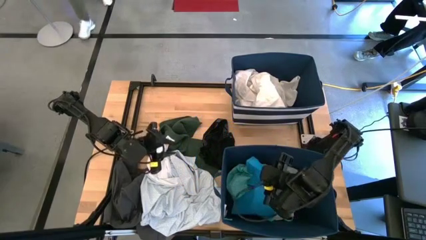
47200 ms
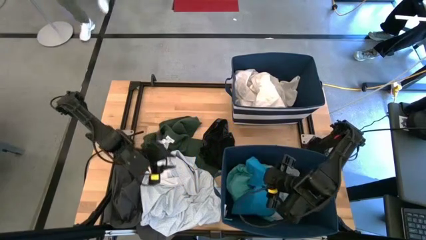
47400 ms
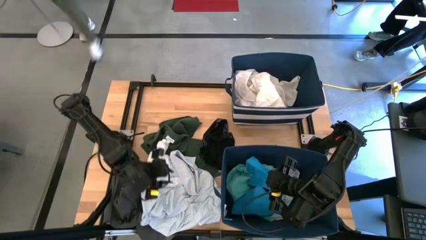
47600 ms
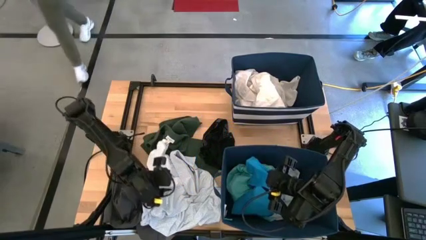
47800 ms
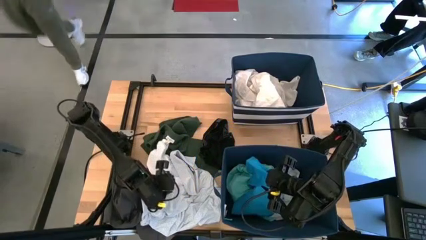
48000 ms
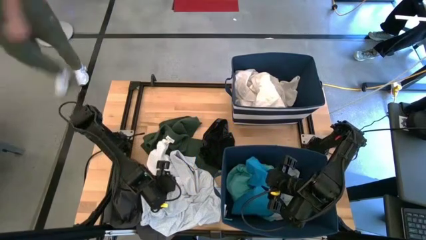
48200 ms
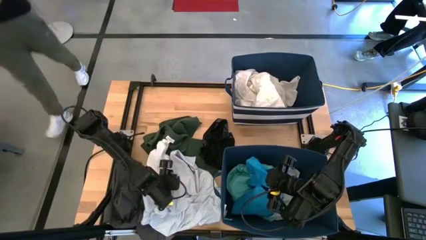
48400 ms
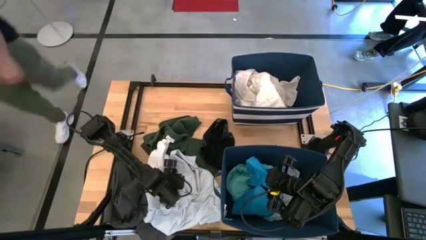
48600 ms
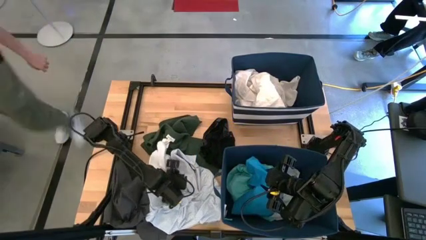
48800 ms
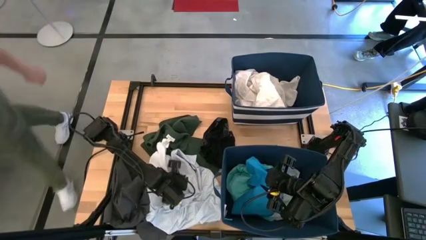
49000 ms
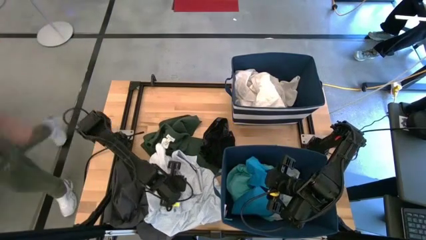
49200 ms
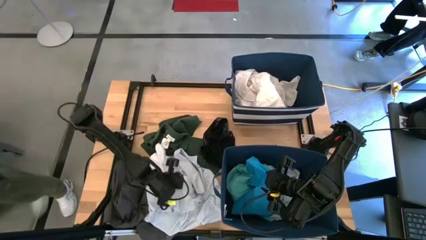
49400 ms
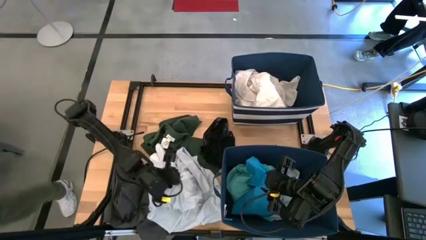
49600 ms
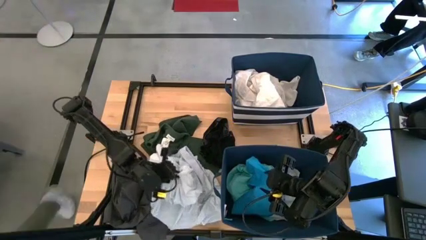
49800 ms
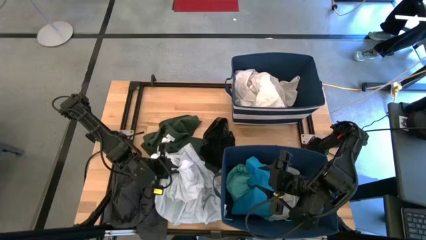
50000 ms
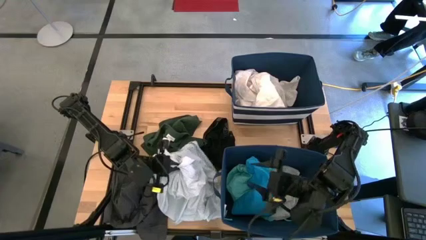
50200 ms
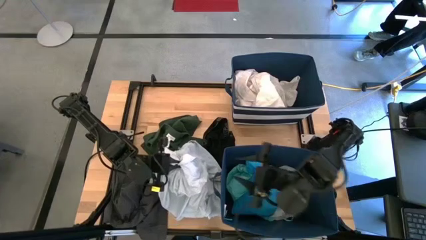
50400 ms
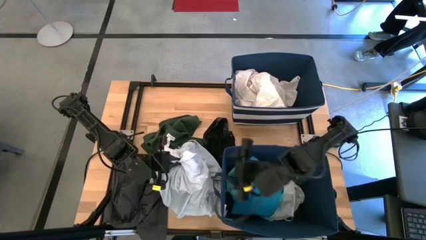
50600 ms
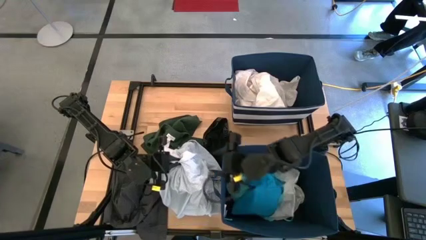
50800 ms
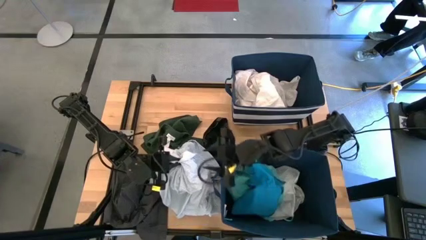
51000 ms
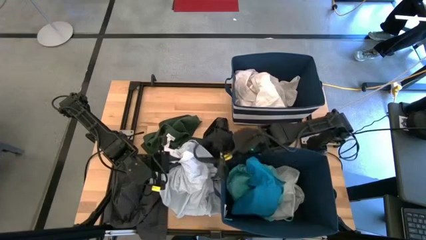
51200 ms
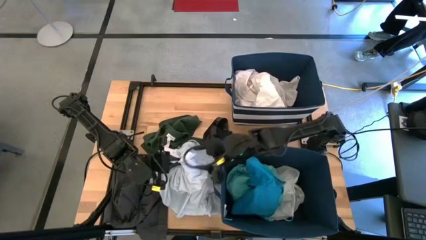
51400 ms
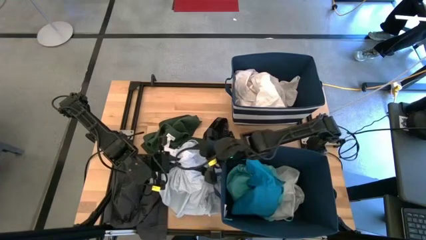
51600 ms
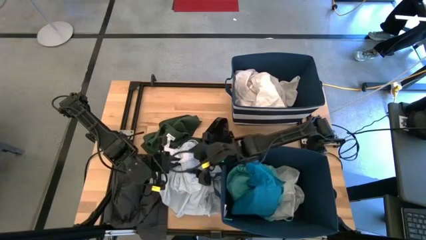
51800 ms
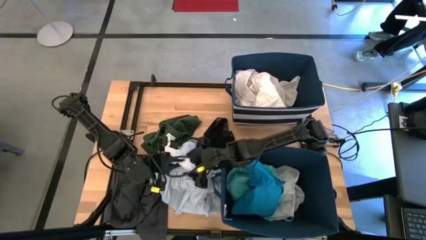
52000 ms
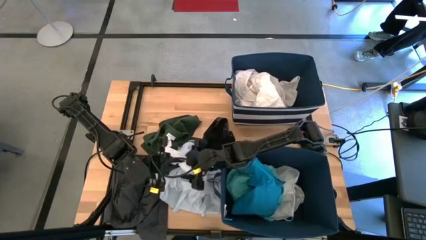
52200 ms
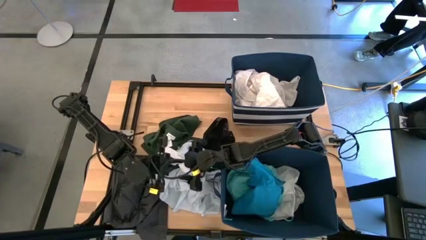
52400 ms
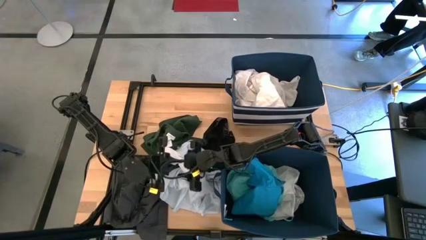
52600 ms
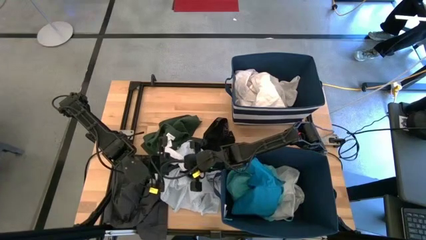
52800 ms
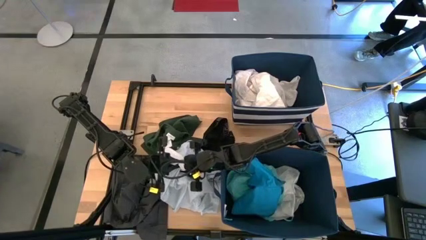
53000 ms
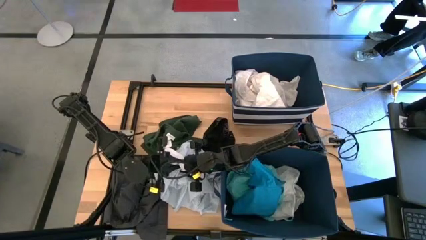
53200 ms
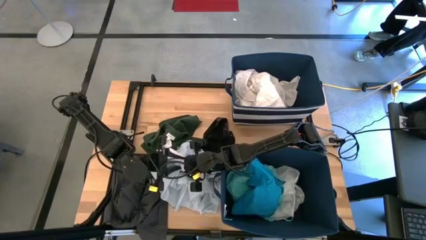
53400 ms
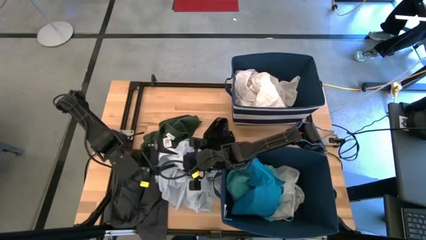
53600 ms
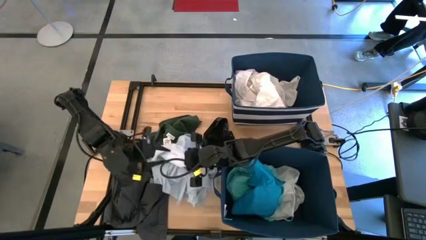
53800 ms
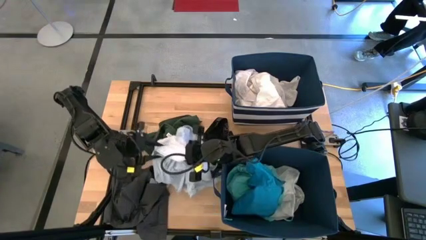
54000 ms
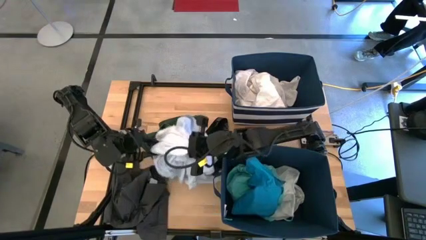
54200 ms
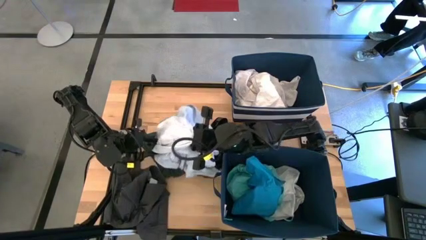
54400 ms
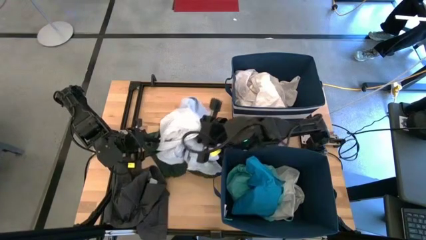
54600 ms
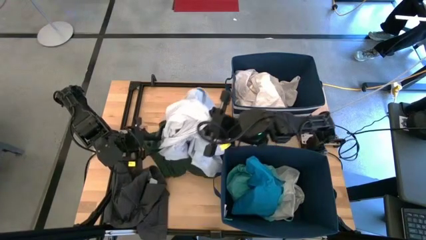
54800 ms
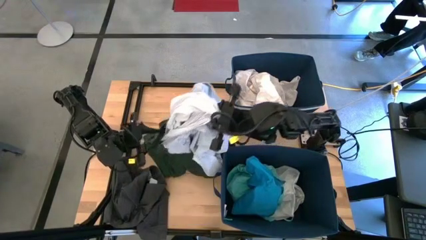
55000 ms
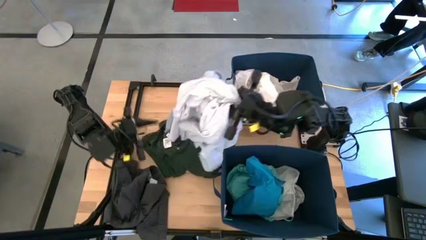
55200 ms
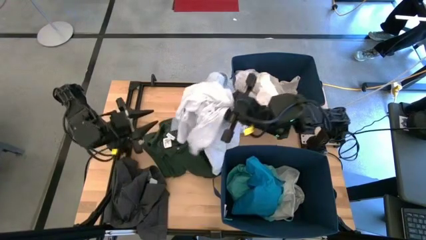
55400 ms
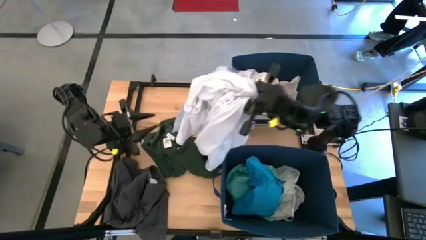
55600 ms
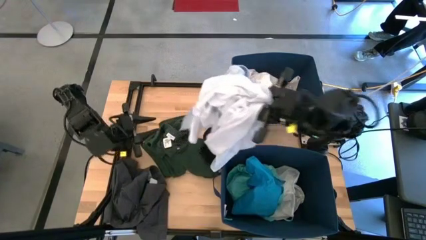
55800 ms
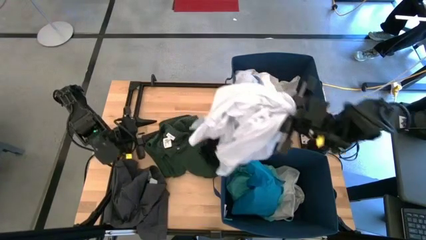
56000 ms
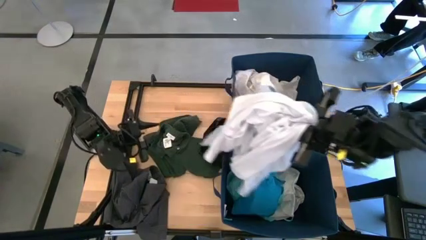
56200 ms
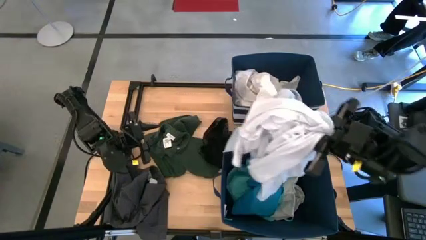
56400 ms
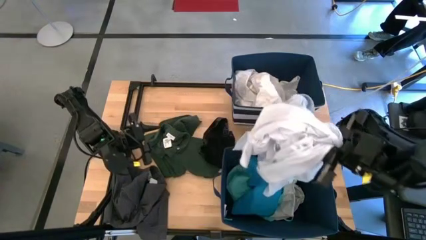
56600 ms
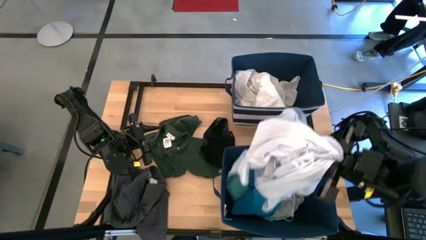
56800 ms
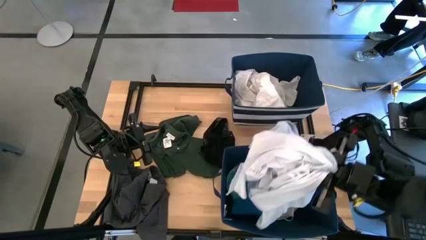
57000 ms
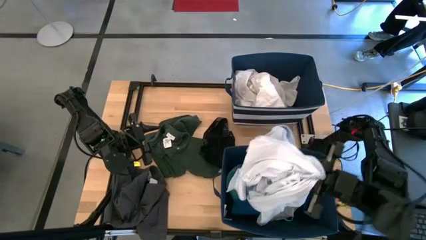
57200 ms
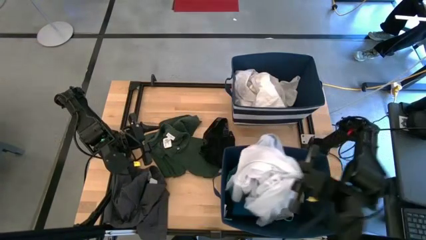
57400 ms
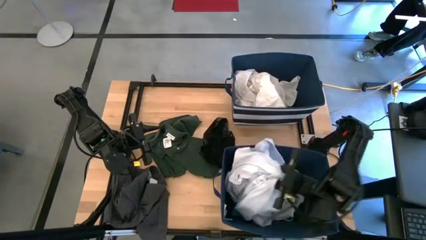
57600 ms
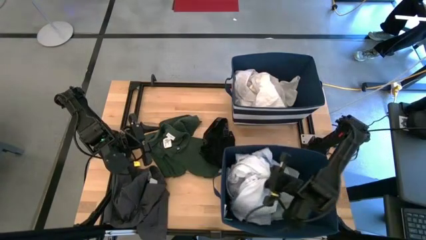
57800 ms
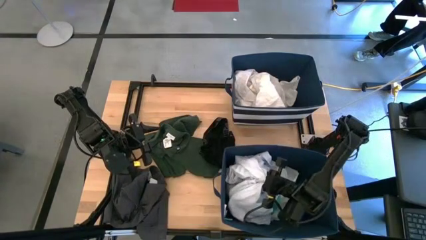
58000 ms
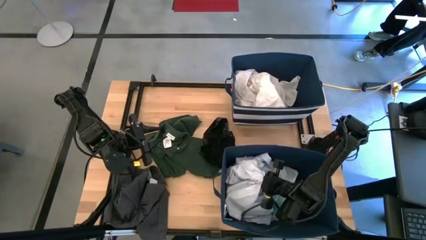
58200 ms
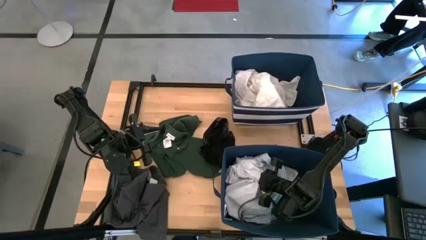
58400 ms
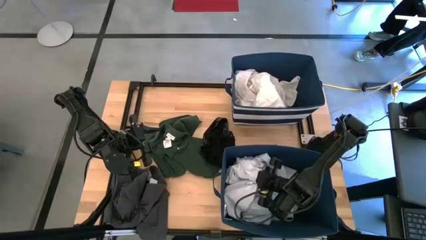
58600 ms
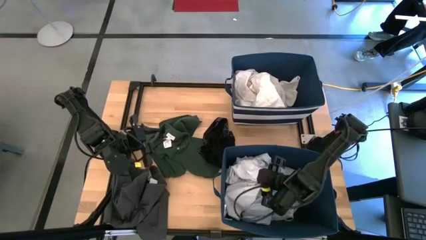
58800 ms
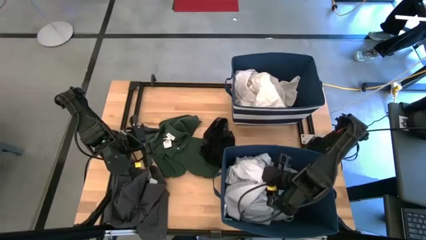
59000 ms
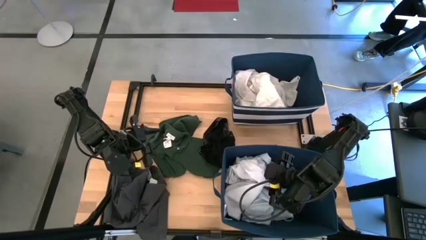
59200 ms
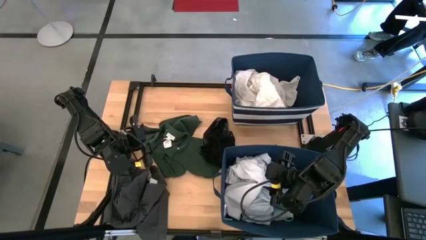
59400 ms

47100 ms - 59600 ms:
Task: Sort clothes
Put the light blue patient gown into the bottom blue bin

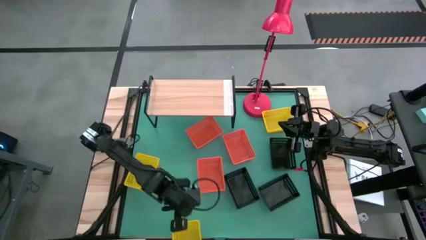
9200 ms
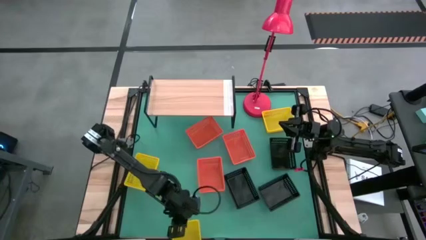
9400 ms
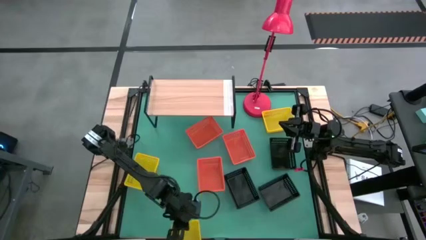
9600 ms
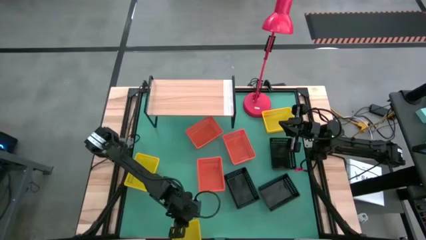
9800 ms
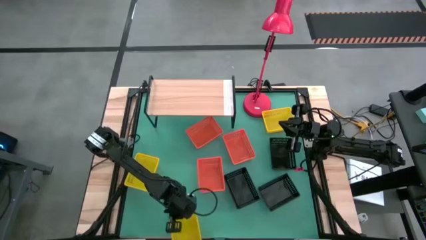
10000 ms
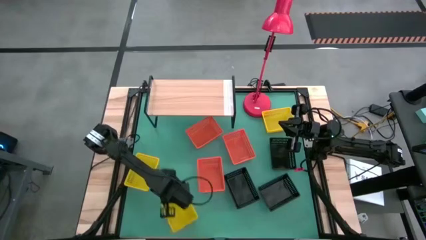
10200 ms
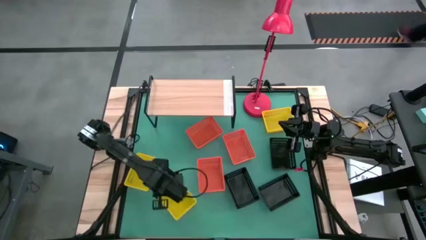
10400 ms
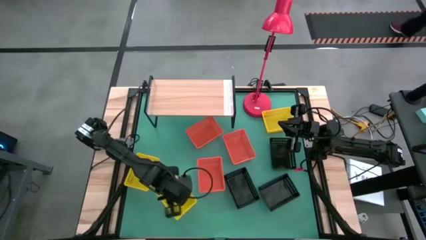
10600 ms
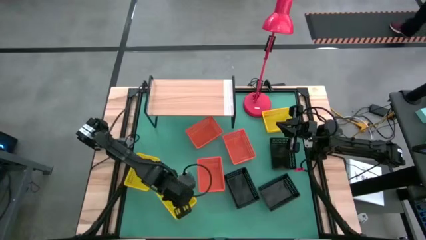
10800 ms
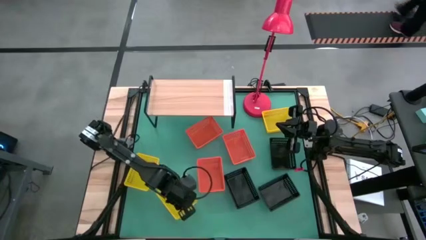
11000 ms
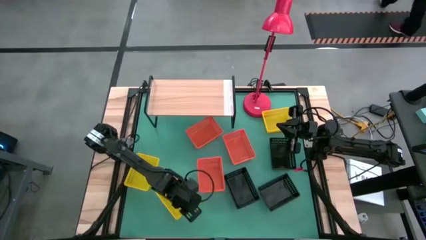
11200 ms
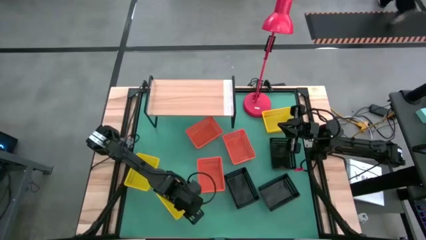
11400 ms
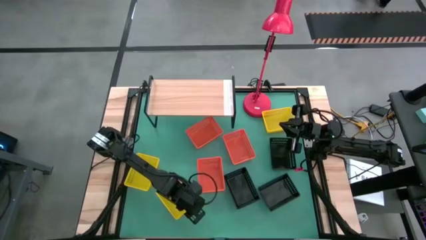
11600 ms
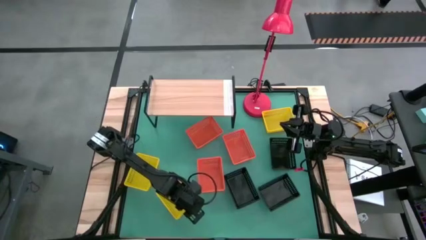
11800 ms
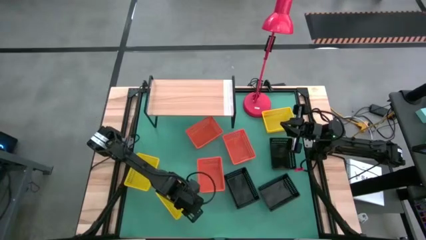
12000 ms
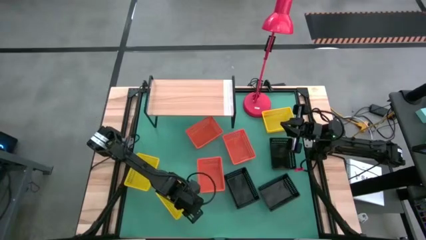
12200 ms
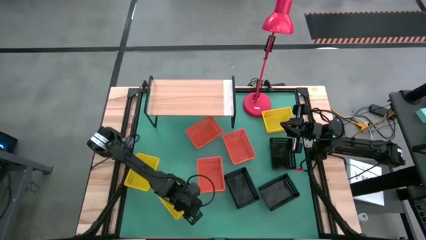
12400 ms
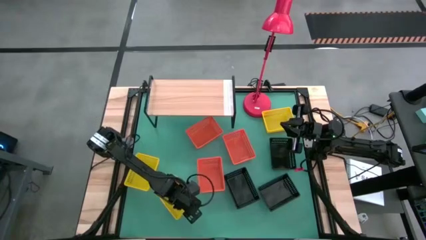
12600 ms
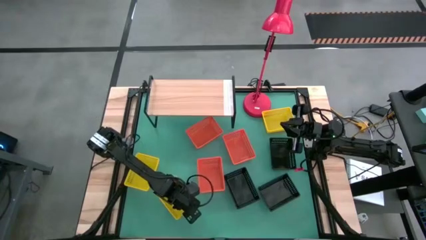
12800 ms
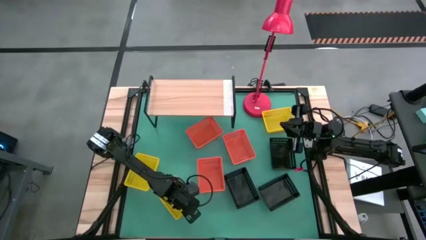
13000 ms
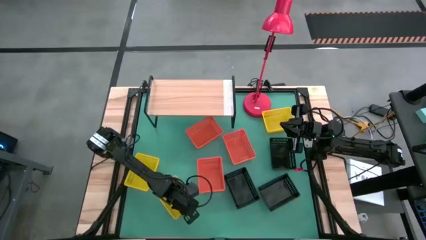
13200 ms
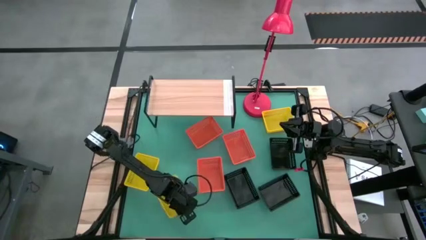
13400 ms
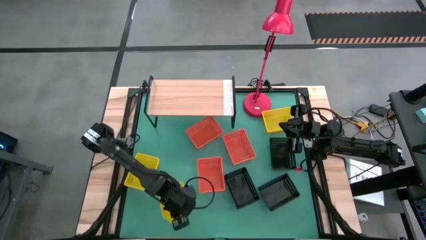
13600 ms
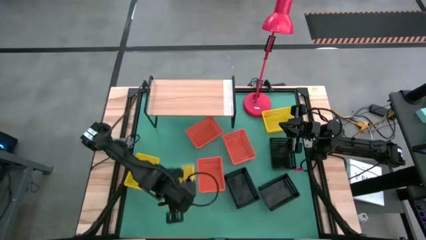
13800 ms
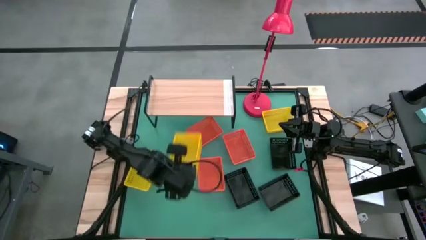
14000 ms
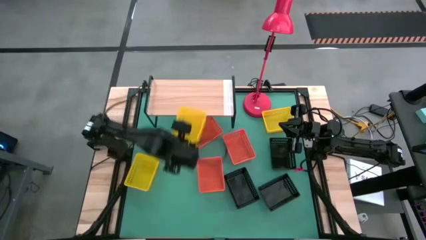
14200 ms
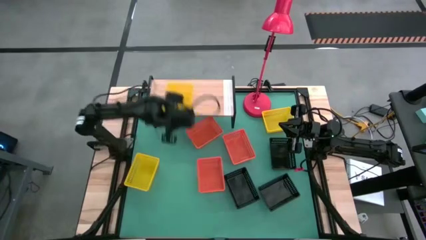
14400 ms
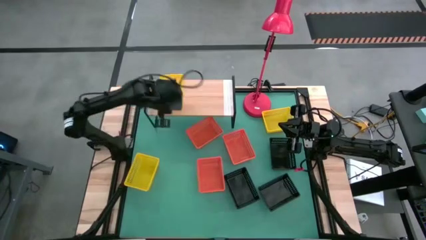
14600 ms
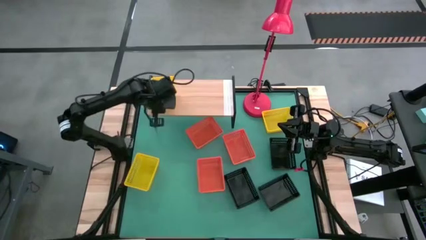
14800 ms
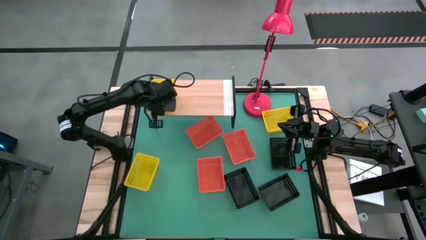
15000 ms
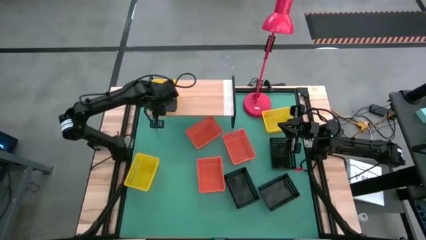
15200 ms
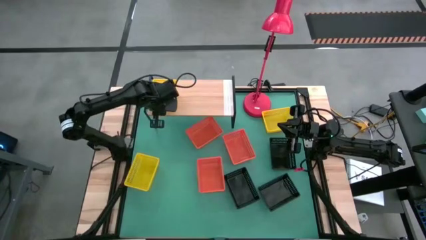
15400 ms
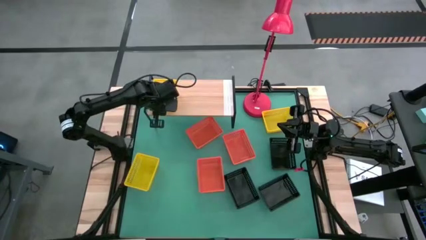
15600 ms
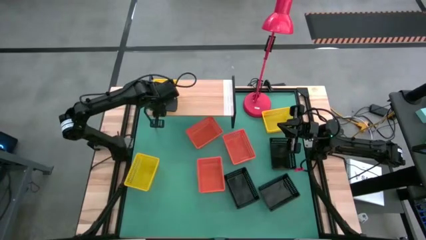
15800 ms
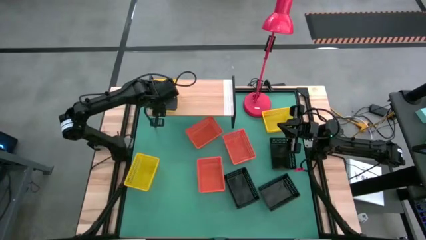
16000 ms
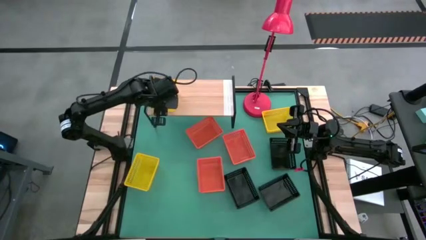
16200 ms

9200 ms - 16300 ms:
Task: Stack baskets on shelf by color
Put the bottom right yellow bin on the shelf
